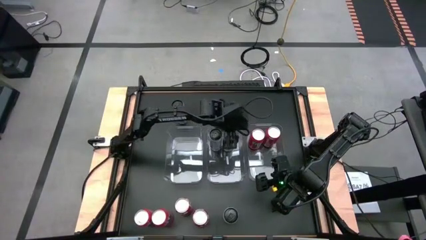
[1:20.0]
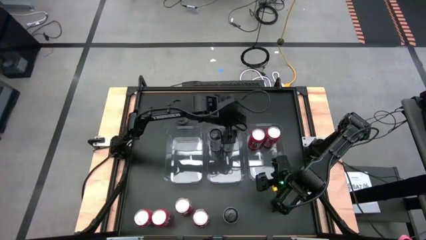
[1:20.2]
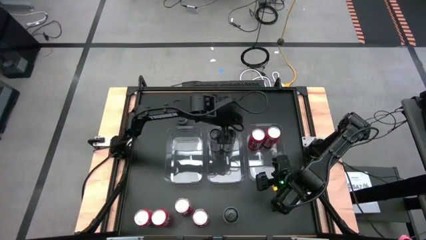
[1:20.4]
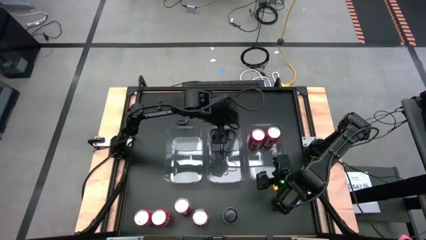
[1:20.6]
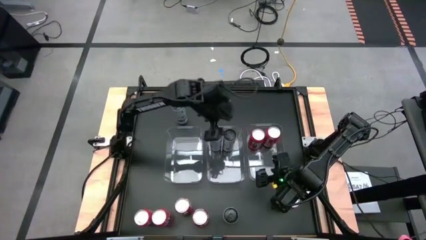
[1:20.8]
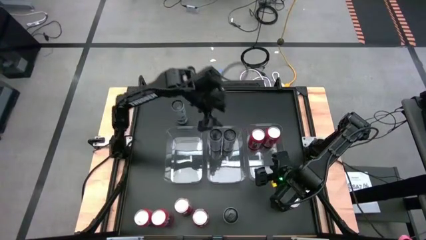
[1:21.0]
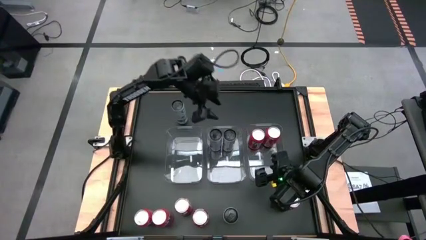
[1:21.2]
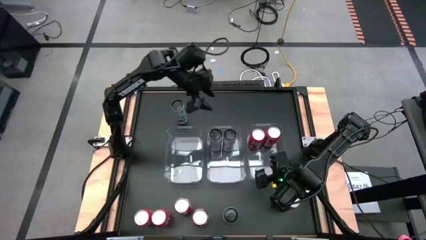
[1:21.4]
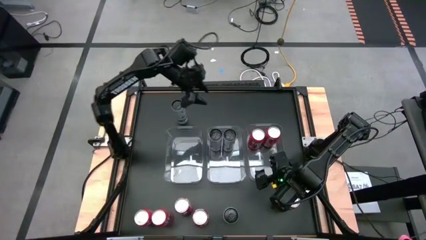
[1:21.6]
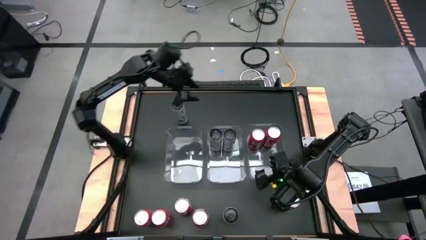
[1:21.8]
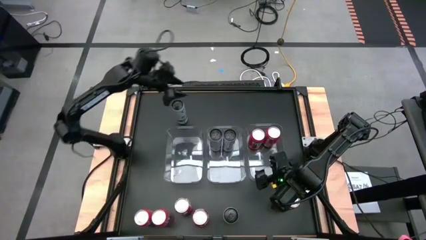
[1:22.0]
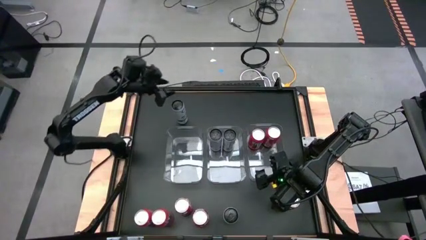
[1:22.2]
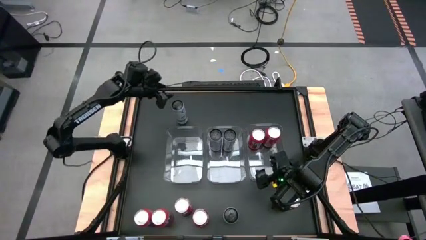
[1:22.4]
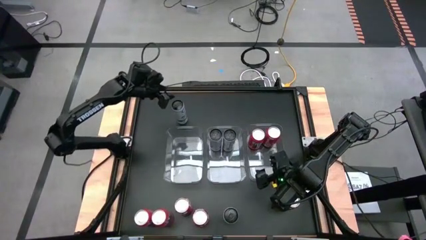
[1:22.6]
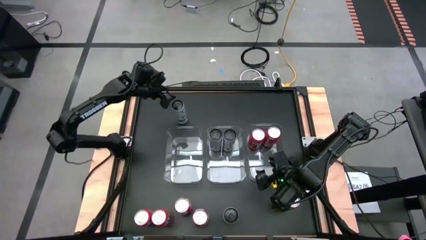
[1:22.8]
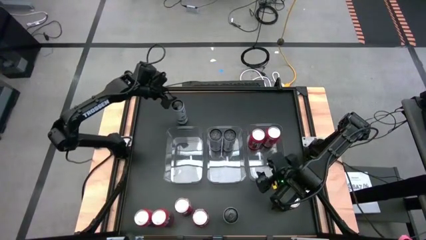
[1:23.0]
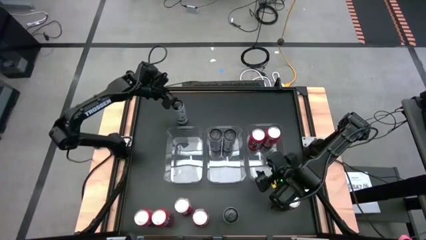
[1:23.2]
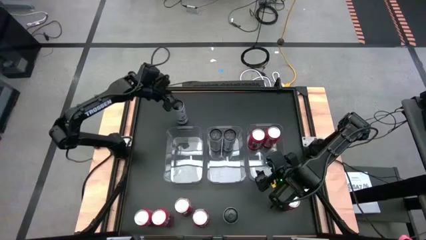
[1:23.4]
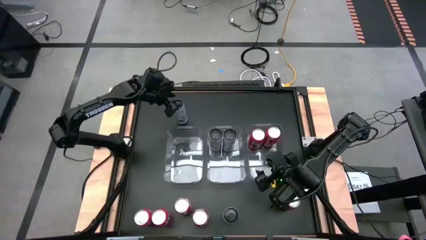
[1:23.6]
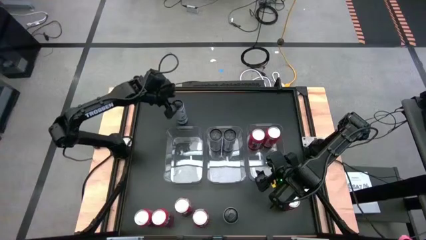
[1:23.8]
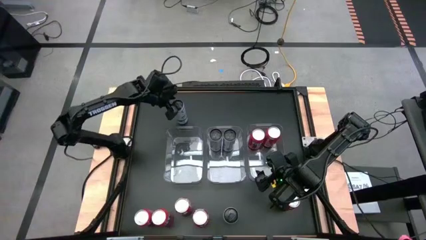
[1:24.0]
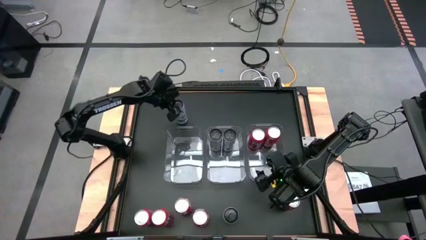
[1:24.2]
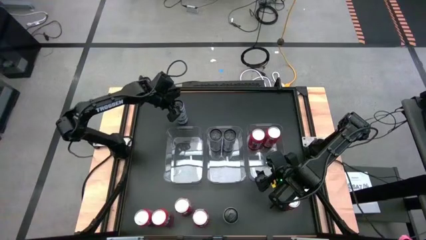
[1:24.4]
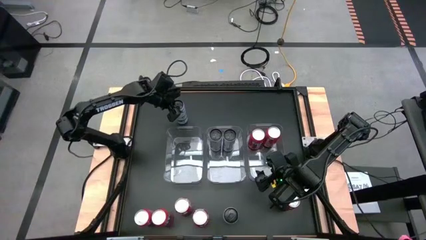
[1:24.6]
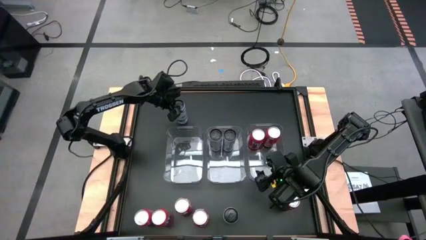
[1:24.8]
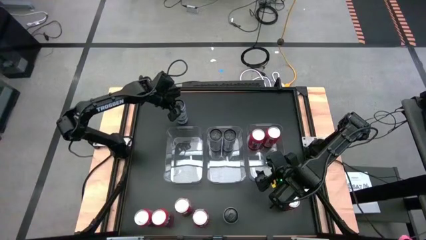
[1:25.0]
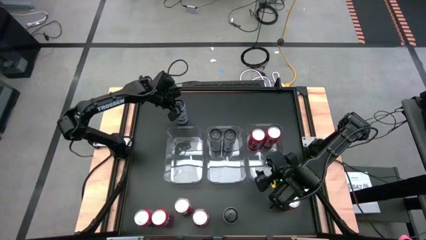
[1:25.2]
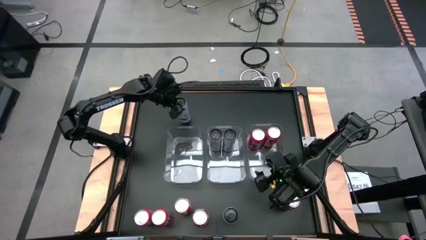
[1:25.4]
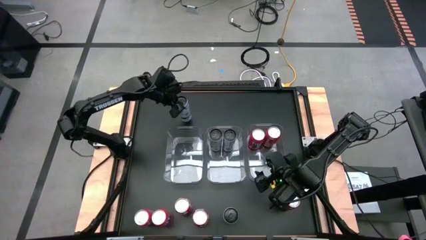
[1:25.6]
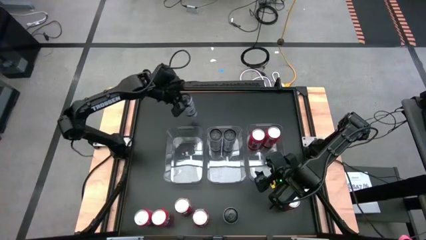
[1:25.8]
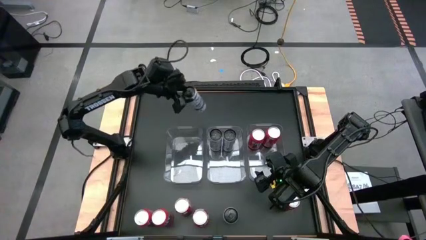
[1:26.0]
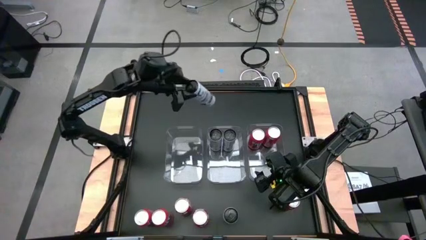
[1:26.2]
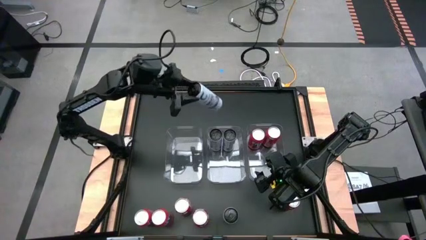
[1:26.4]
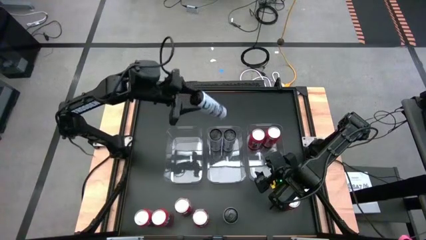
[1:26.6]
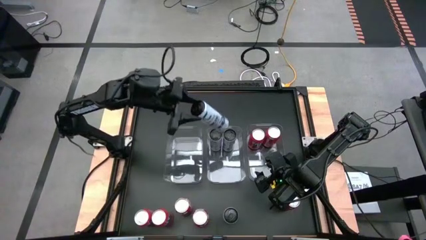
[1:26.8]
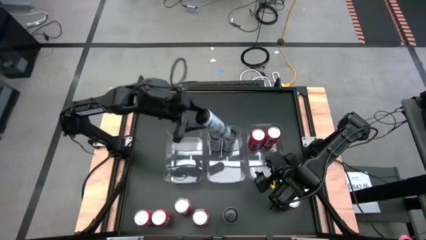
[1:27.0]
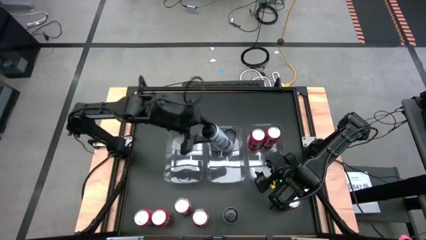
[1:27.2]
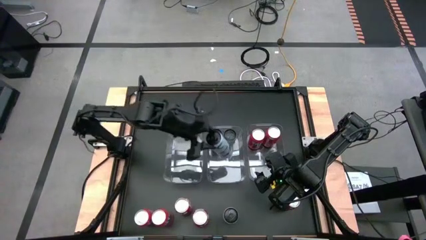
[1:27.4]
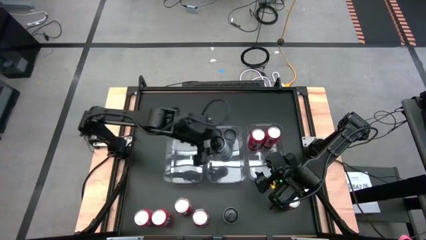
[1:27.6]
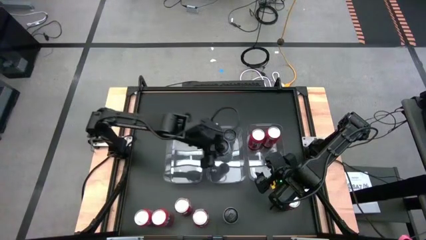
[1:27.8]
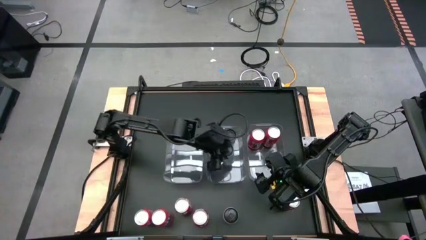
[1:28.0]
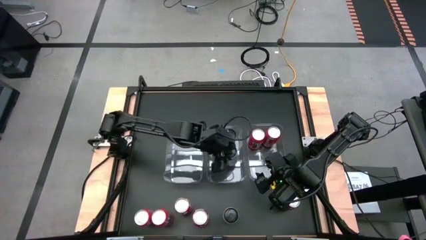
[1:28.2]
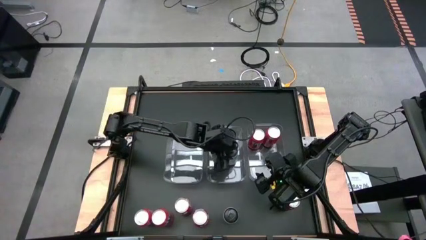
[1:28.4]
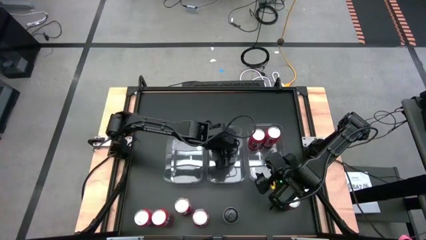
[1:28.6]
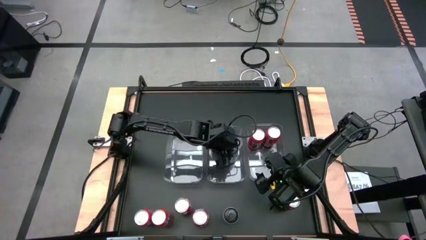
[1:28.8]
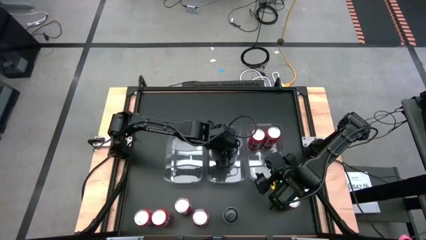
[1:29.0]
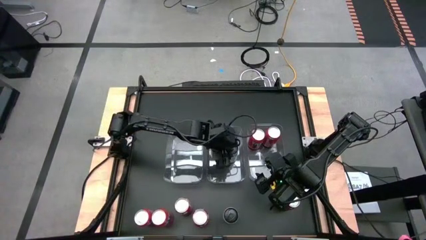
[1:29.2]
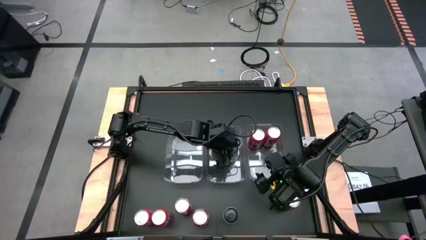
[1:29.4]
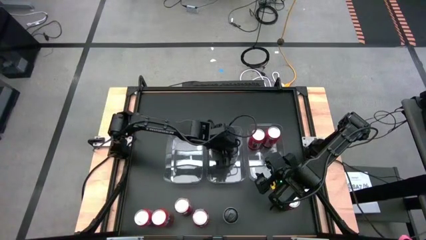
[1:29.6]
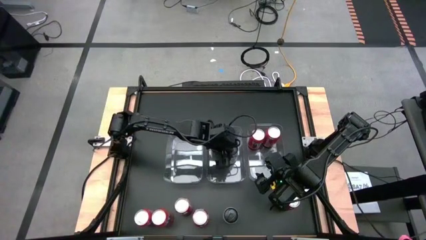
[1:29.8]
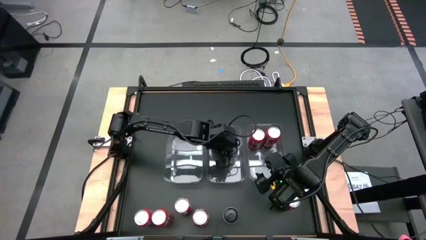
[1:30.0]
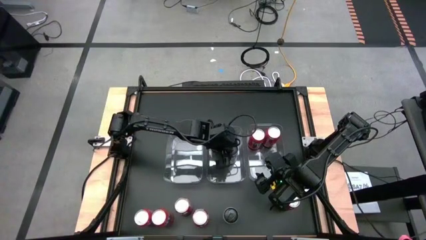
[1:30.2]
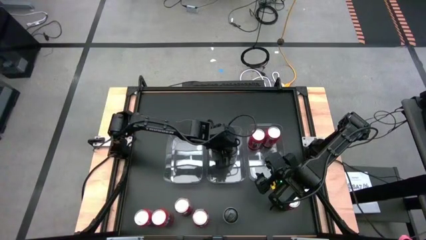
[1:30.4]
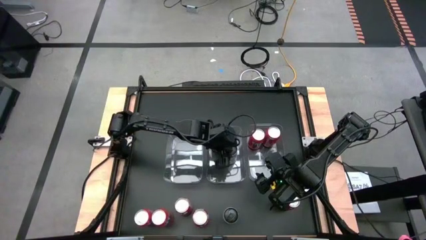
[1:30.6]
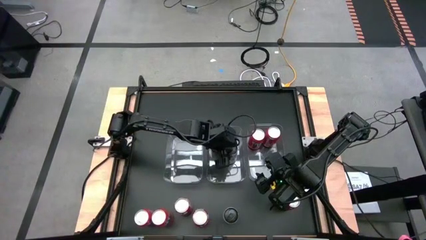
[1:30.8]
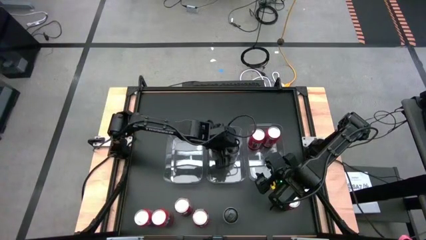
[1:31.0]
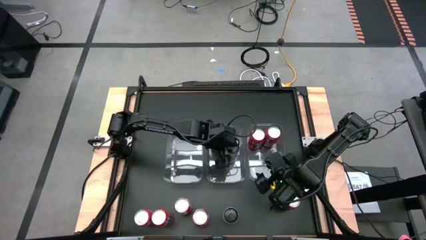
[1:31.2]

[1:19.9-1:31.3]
Task: Sort soda cans
Put the top white soda can into the center transparent bin

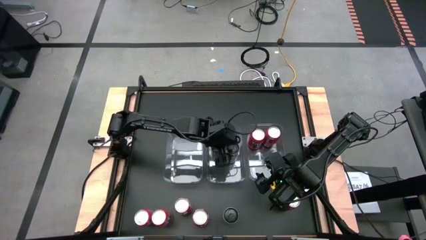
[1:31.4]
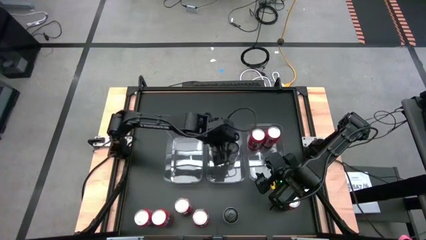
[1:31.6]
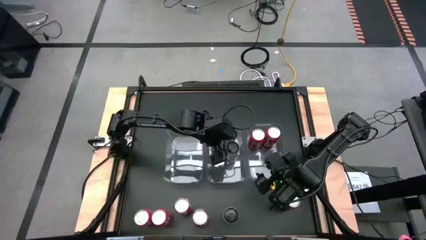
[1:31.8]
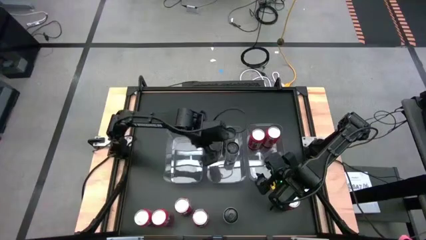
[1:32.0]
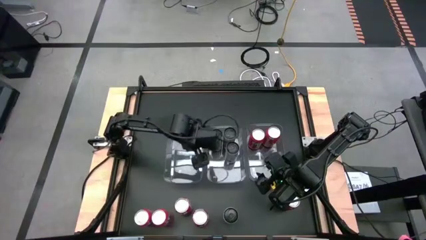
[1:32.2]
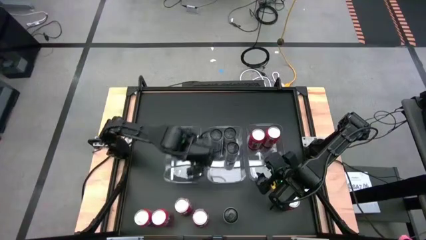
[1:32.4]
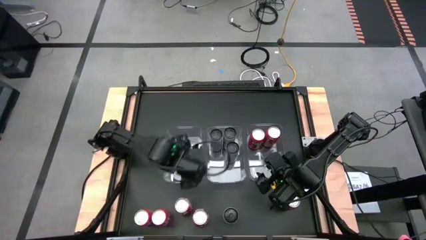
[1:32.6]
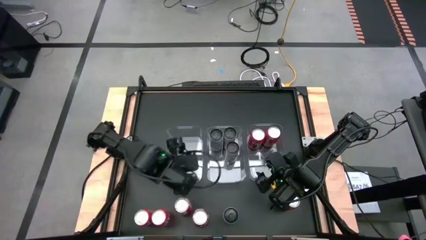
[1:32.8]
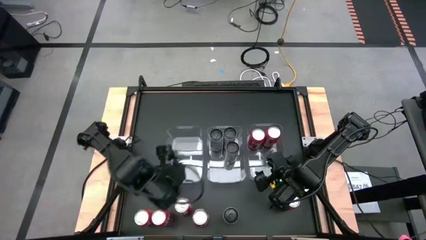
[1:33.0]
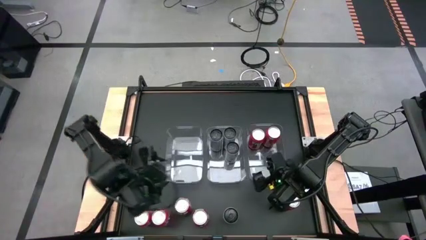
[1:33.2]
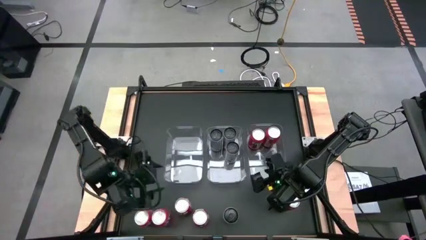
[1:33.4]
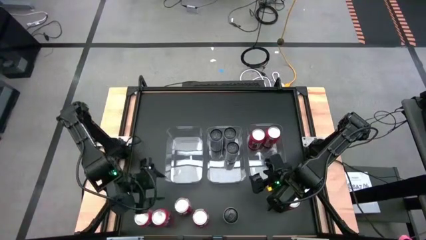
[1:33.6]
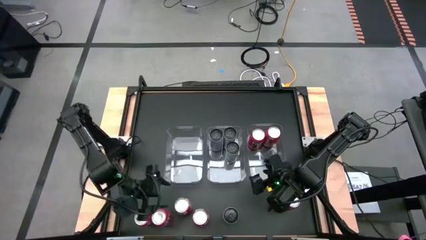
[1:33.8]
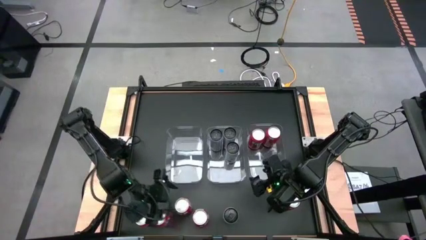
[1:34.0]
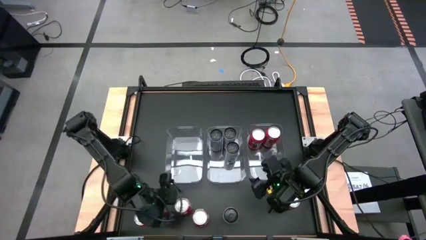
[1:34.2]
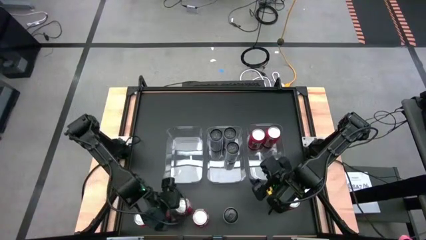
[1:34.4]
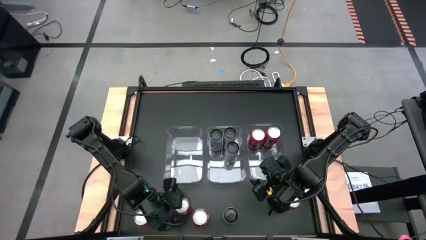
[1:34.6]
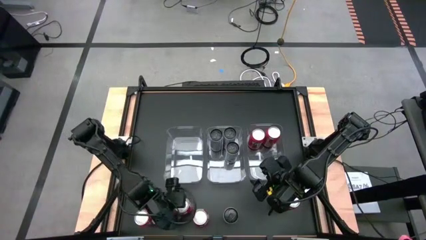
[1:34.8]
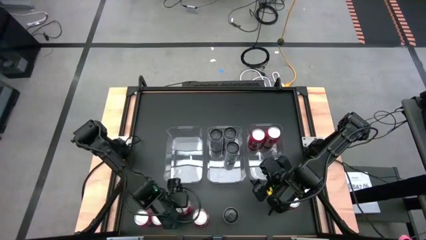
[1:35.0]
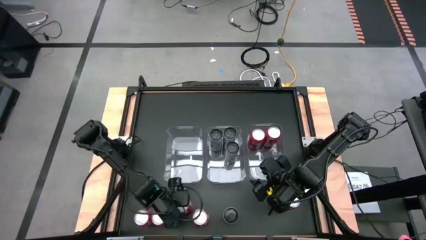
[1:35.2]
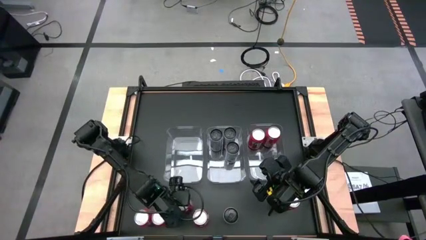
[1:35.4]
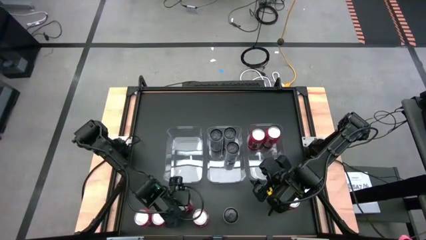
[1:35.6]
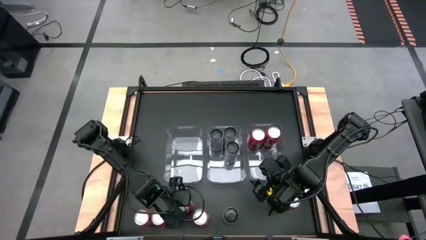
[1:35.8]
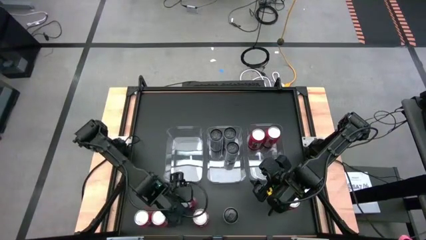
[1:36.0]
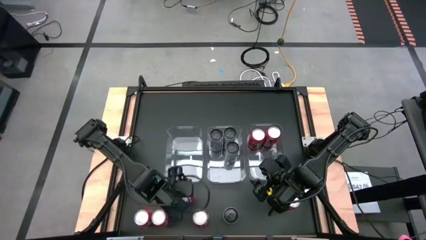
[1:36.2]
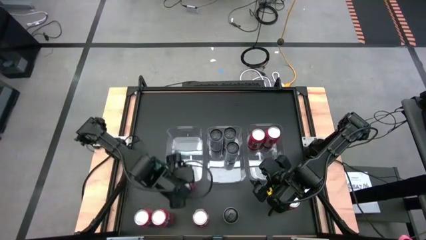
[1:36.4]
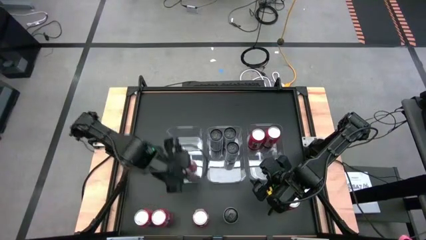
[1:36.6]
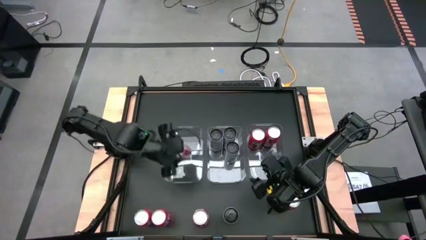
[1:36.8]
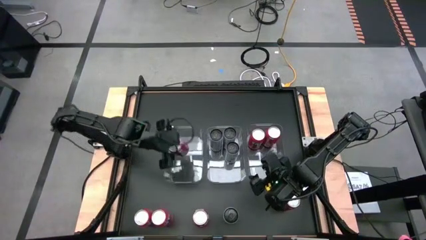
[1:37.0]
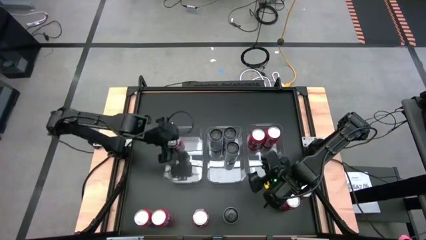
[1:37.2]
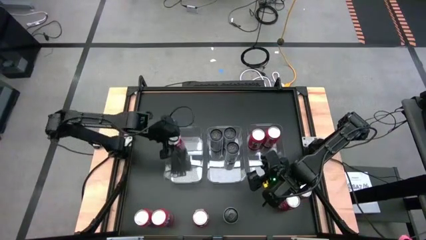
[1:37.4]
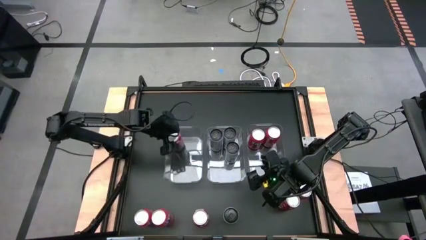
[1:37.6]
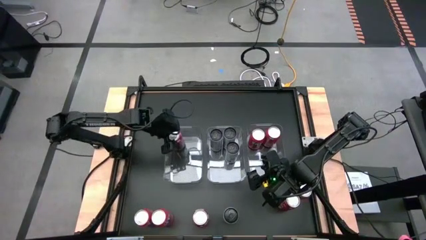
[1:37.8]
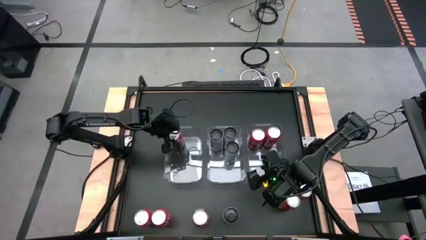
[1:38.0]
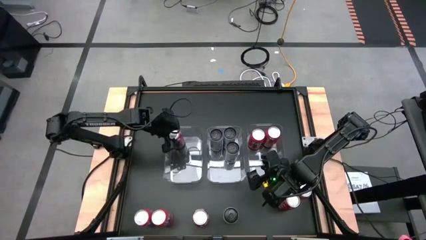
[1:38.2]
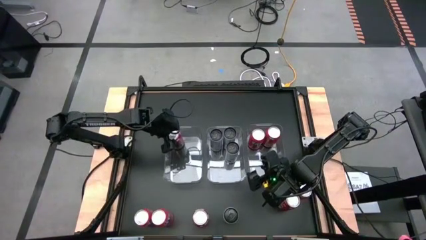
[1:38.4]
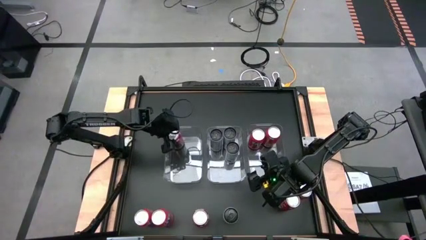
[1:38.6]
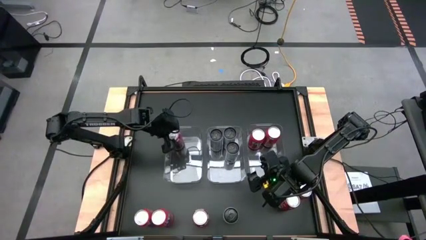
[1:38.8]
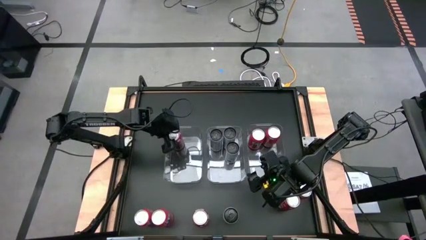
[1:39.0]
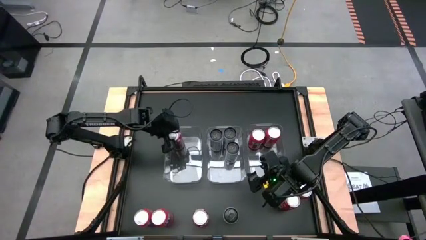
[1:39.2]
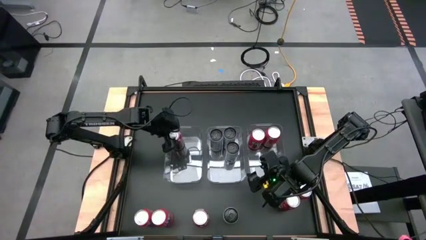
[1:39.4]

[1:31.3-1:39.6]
Put the left red soda can into the left transparent bin
